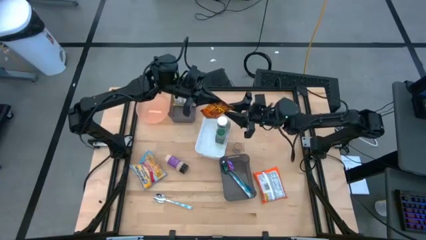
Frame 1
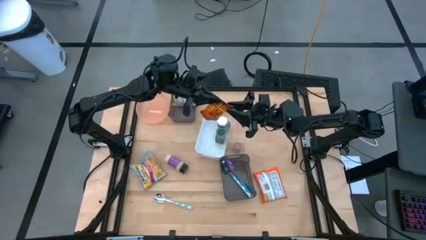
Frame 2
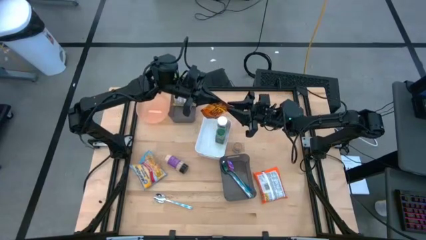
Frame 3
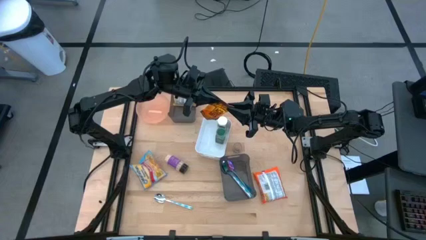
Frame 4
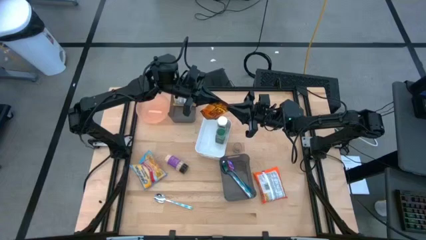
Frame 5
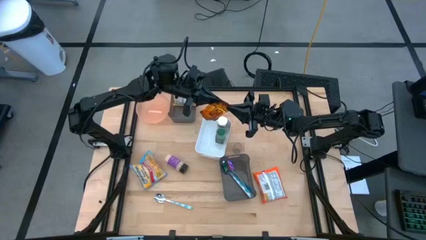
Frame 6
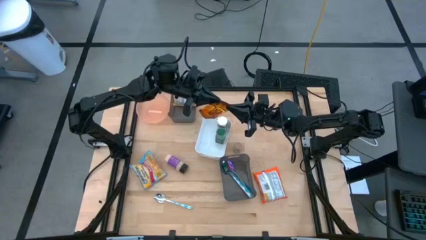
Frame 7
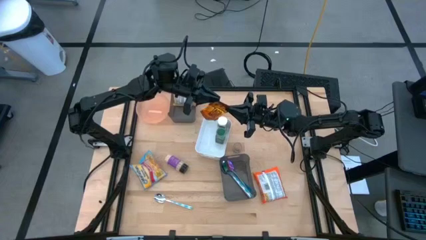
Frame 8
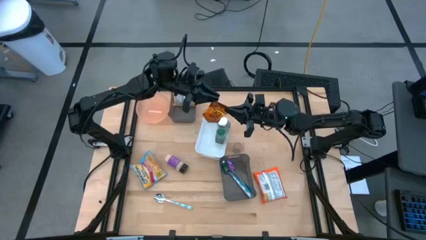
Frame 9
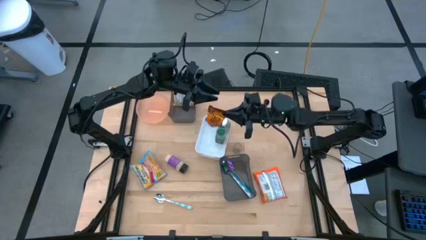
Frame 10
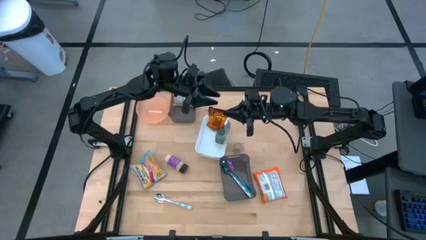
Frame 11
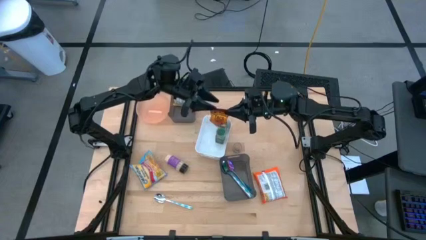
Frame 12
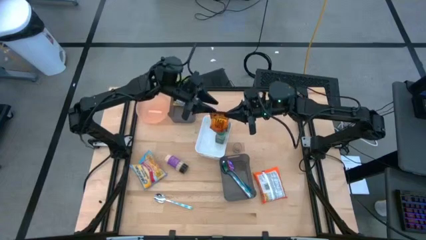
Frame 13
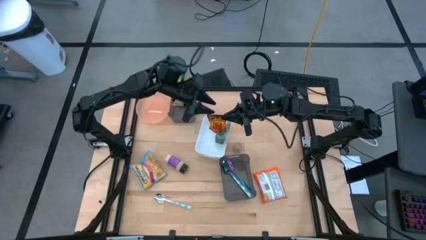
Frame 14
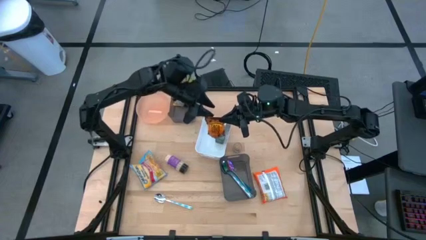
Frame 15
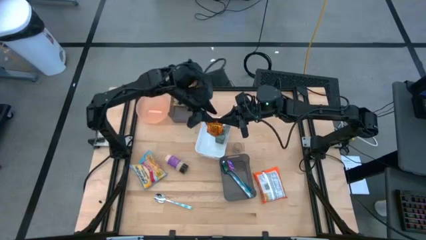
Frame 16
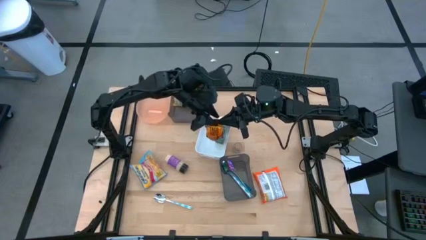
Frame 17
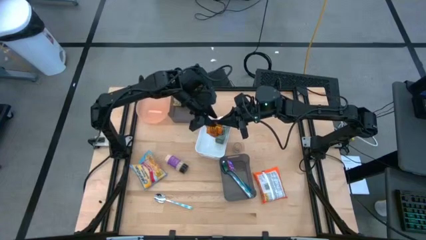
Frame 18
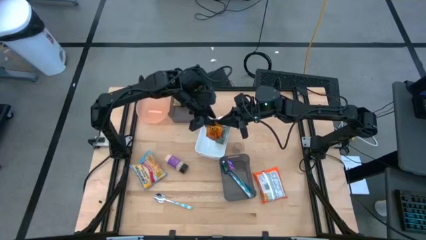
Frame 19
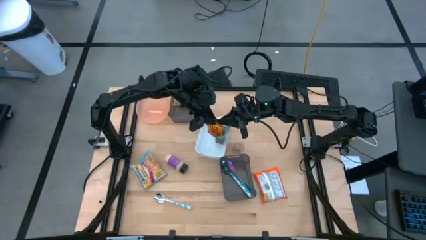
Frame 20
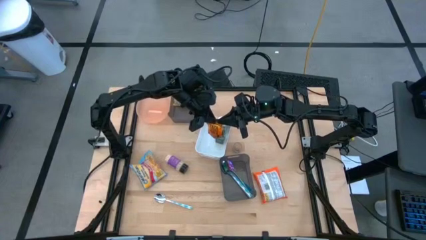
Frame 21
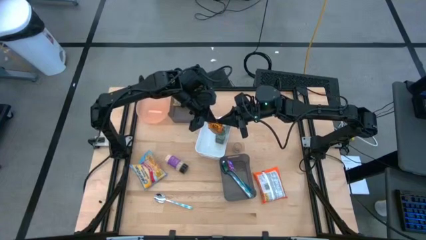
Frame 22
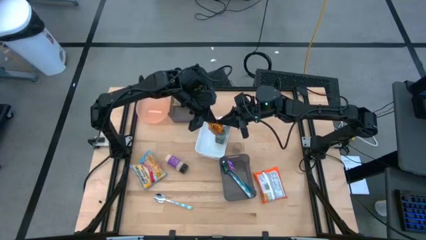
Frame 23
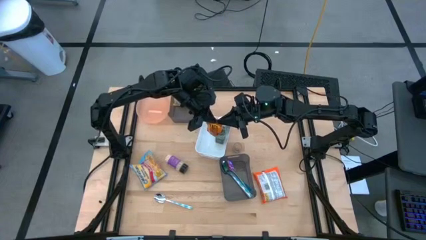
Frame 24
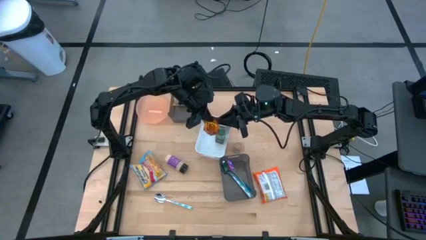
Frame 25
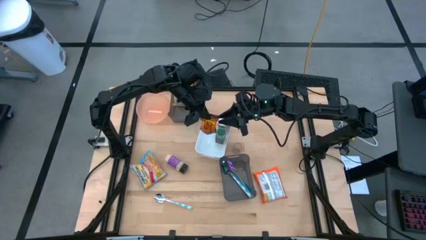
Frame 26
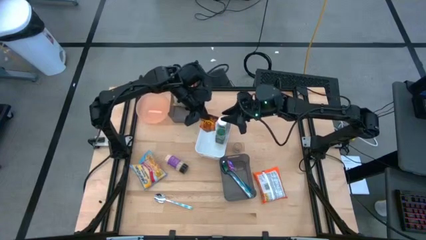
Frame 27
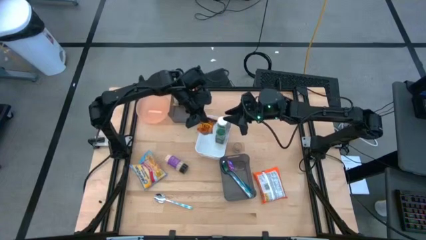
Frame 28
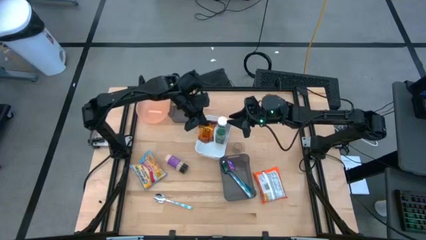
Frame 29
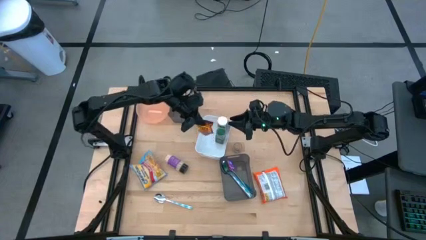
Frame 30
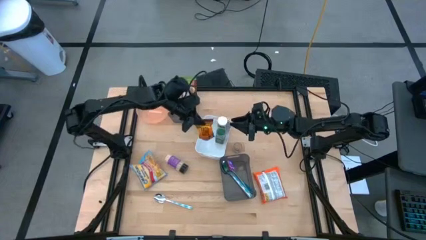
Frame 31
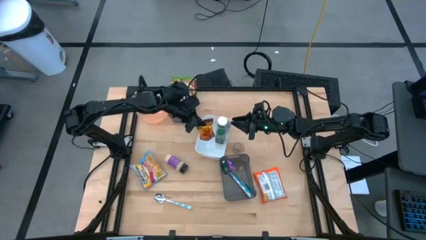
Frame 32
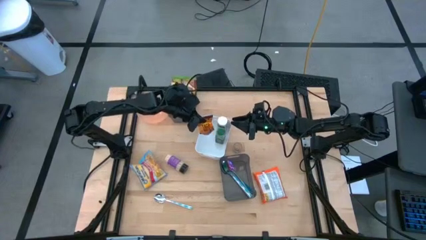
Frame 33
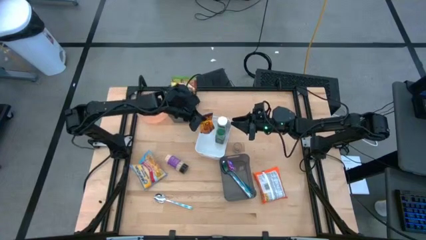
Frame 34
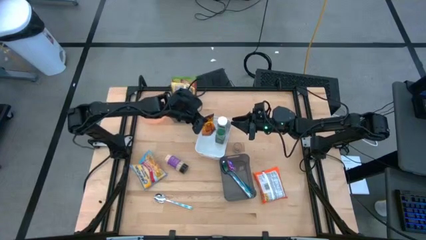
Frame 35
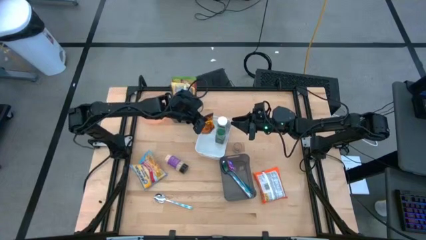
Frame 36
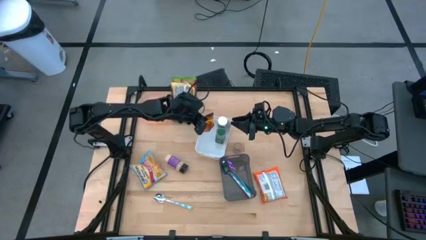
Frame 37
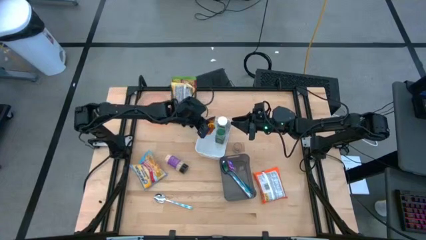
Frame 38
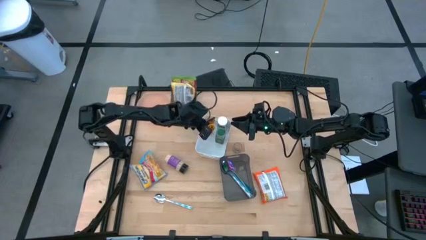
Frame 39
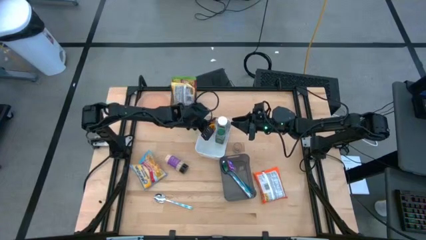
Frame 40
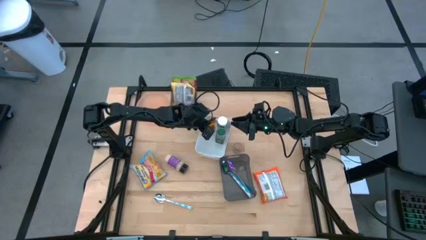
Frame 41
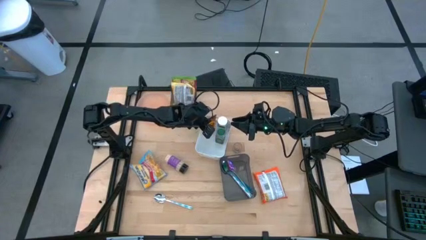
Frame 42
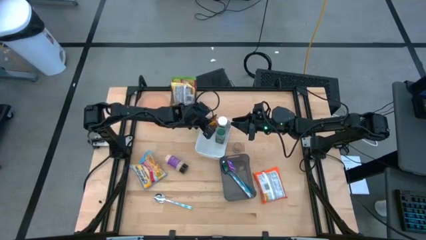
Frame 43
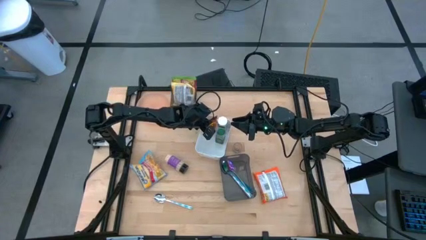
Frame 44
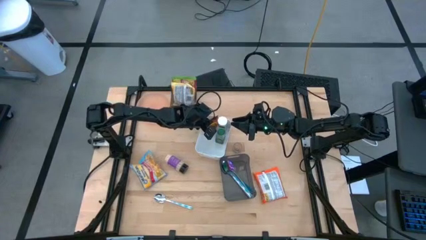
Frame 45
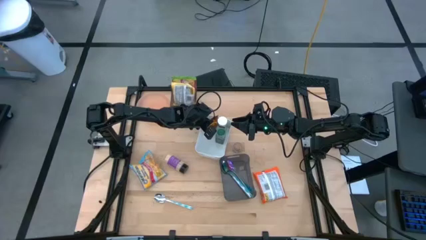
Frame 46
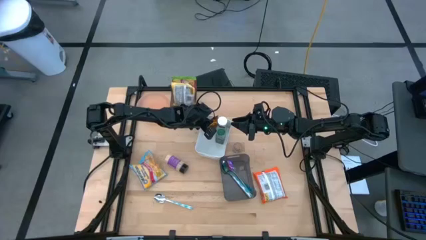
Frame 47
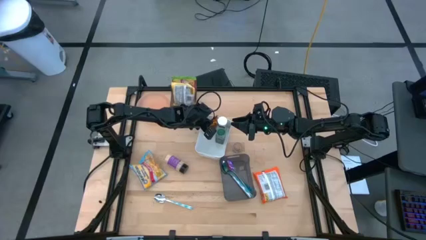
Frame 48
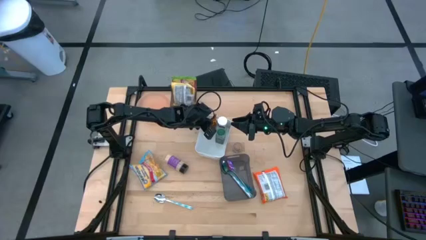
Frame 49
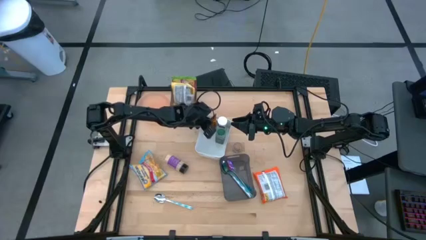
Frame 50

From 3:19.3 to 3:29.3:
Task: Pick & Place Food Item
Put the orange seasoning pack into the white bin

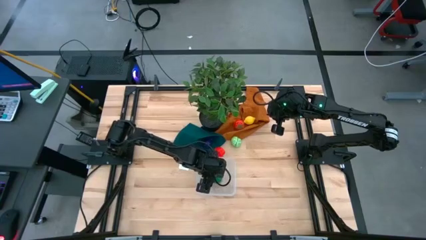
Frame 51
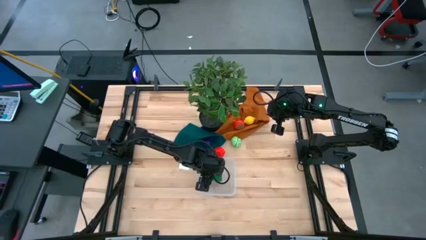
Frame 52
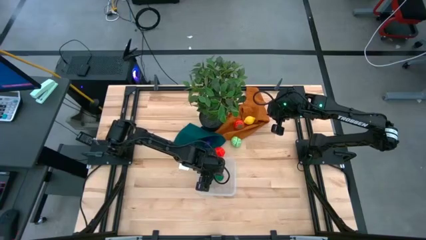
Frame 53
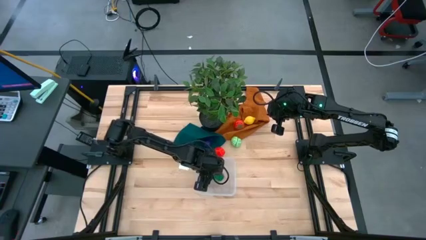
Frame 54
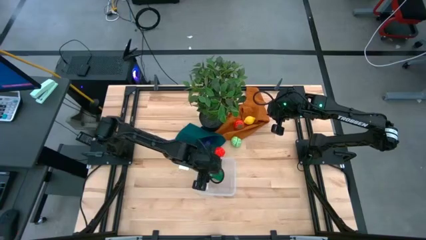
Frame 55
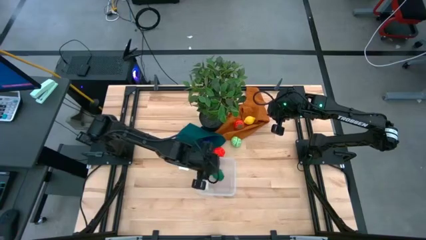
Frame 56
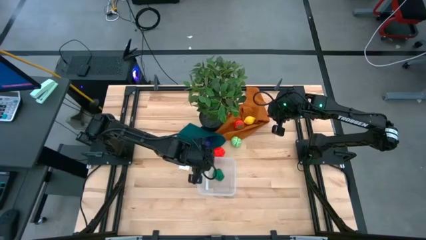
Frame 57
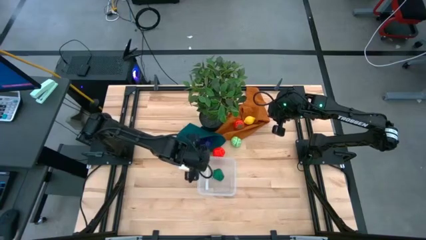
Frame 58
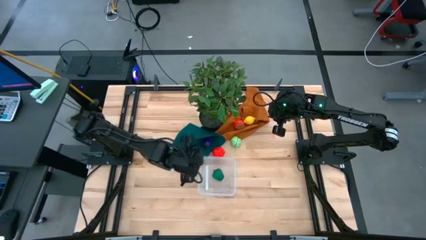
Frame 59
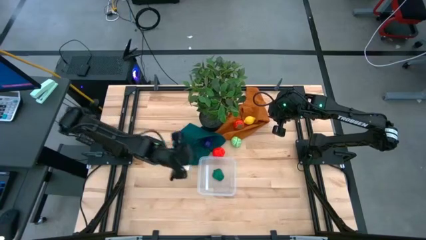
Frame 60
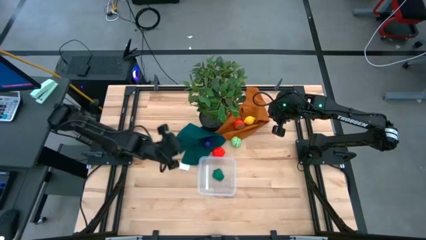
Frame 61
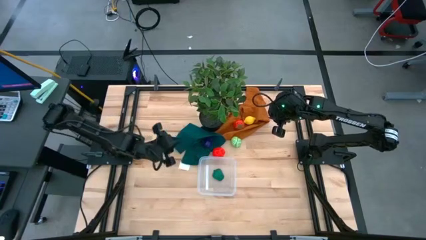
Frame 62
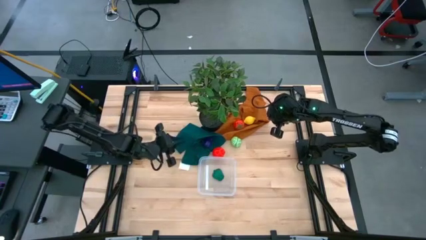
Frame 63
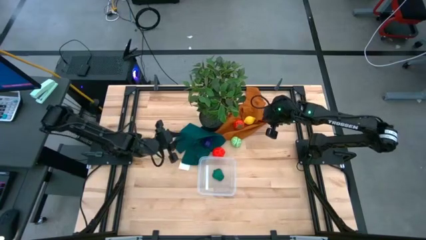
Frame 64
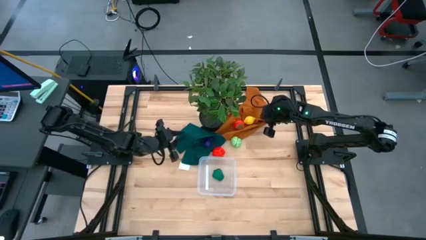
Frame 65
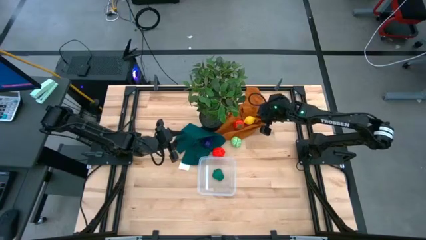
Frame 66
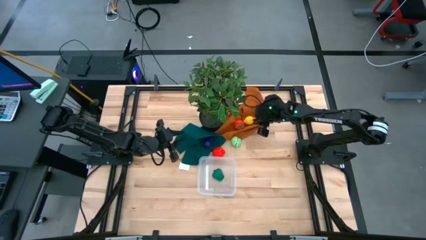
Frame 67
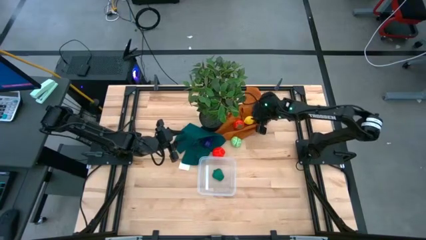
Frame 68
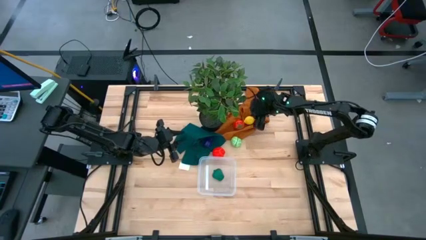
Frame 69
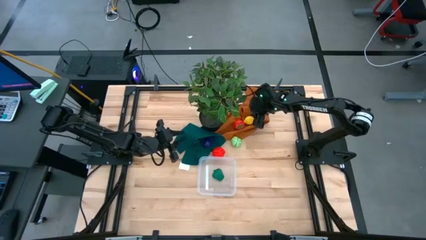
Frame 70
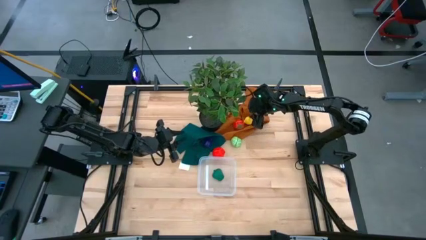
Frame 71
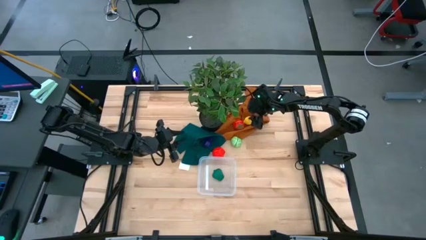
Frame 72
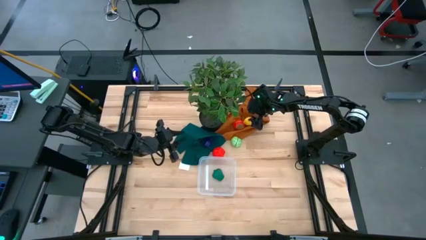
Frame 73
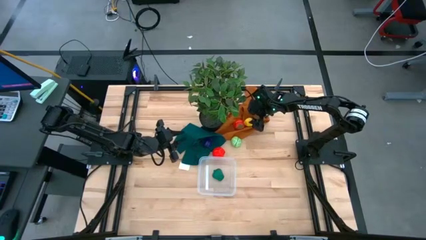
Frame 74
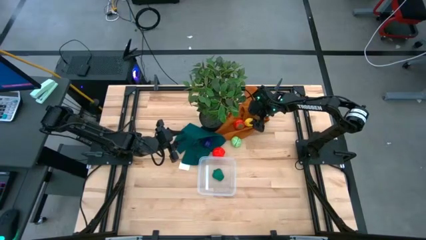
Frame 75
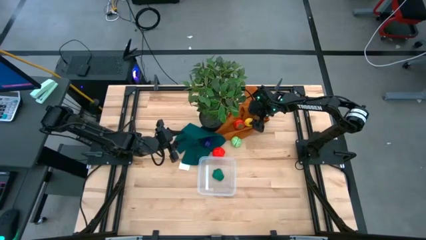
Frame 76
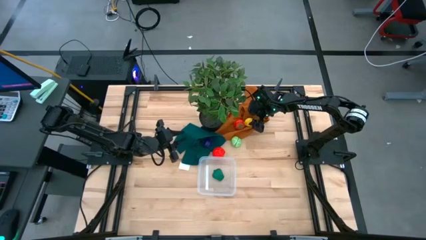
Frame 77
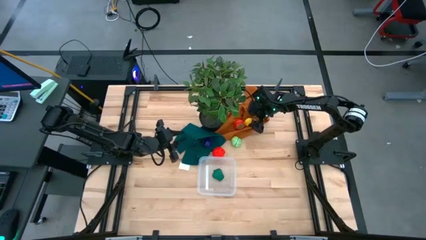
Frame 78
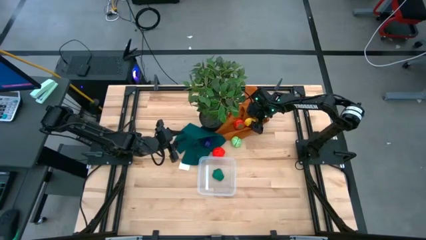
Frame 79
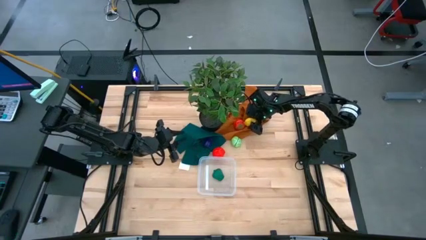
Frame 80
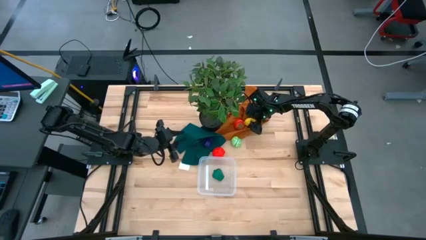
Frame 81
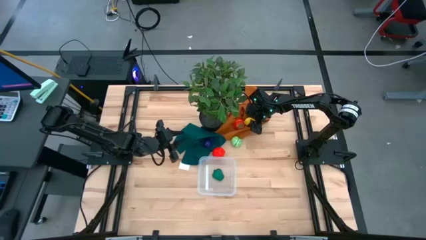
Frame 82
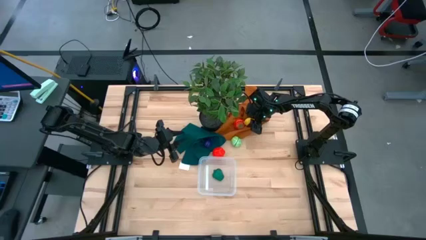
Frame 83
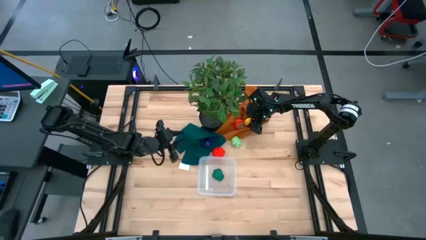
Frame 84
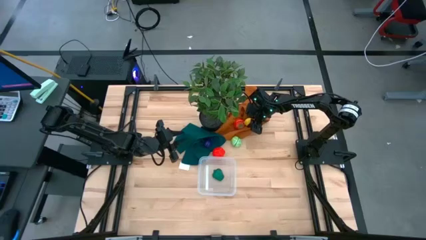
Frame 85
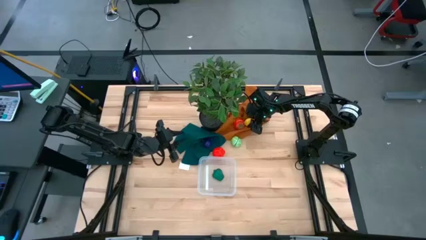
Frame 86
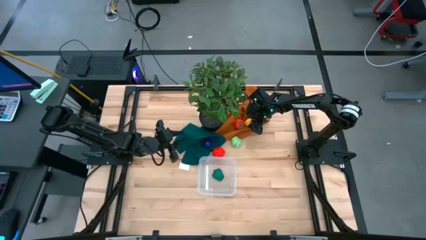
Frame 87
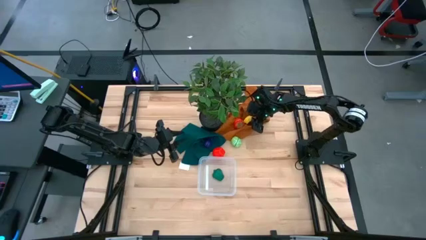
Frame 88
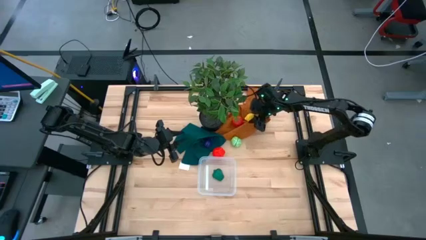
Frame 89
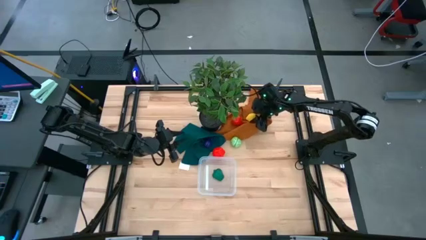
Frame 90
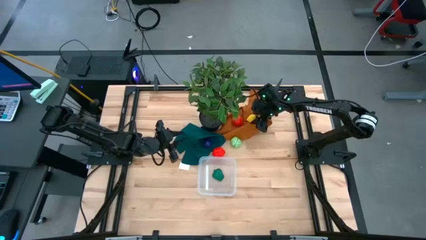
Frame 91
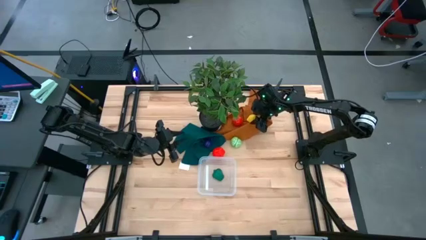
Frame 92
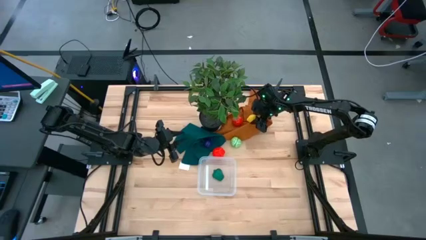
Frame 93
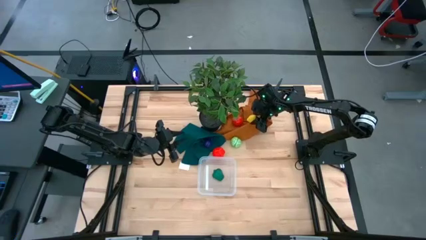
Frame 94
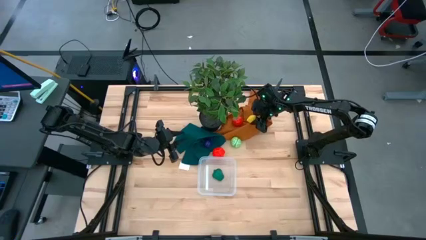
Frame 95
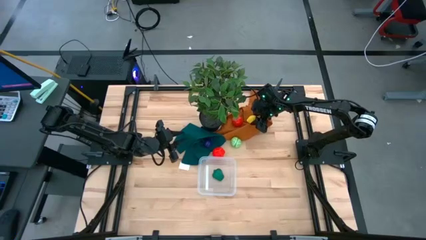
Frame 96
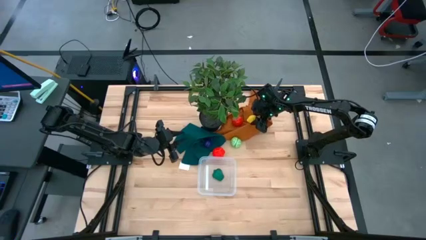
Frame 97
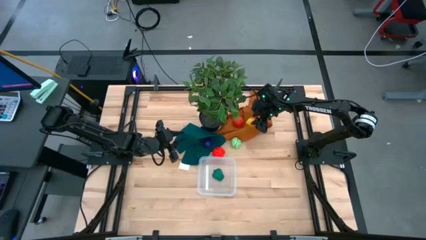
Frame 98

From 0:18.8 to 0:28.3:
Task: Pick and placing Produce into tupperware
Put the lemon into the transparent bin
